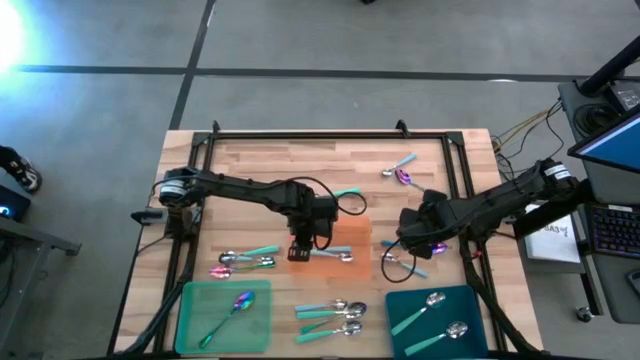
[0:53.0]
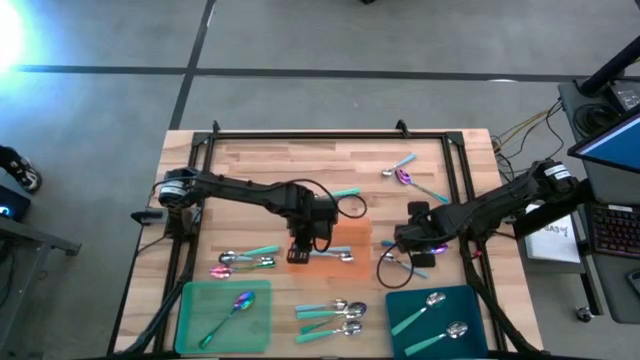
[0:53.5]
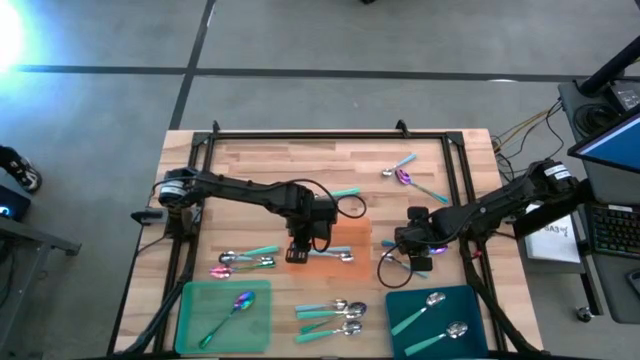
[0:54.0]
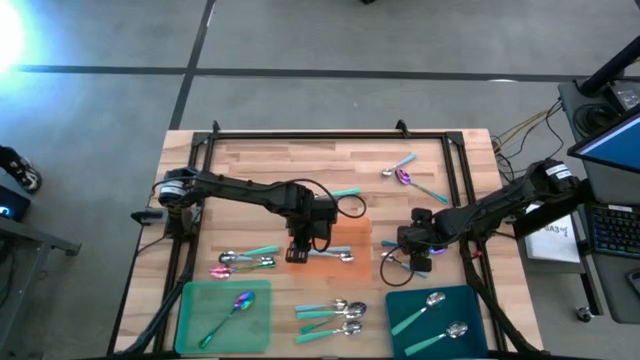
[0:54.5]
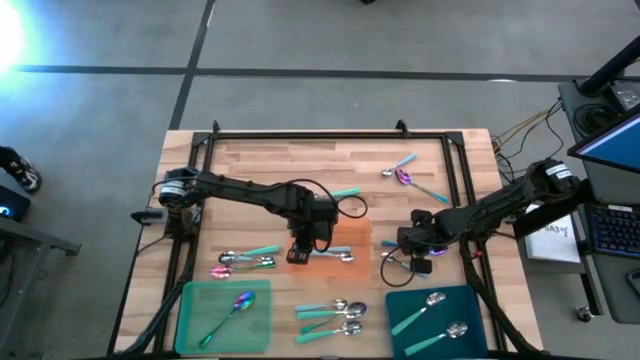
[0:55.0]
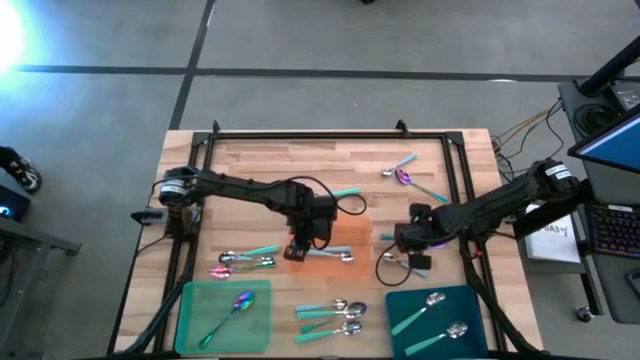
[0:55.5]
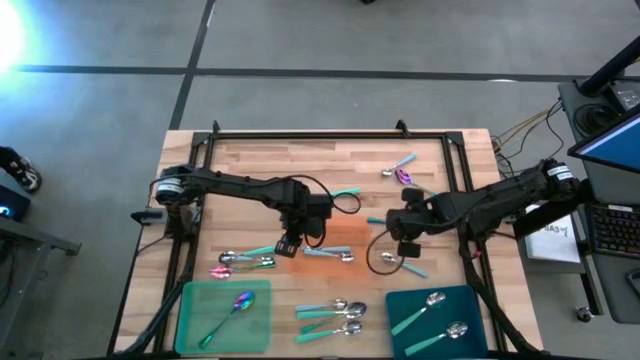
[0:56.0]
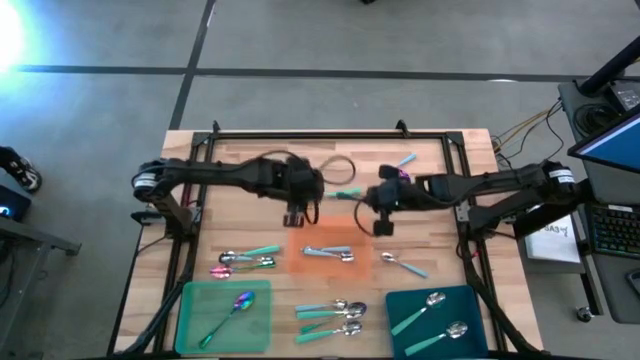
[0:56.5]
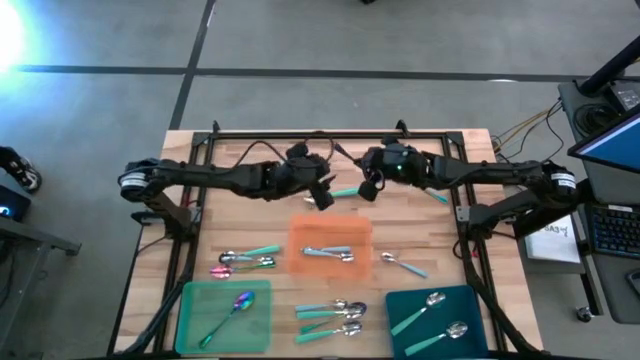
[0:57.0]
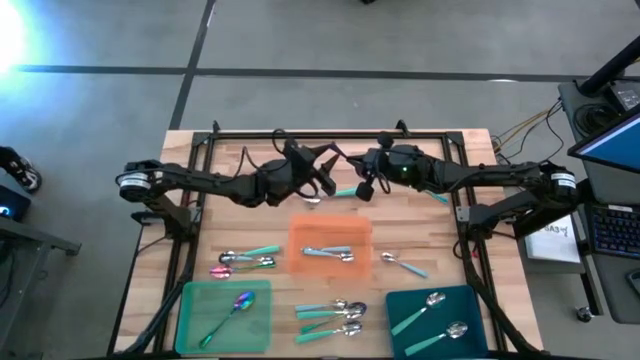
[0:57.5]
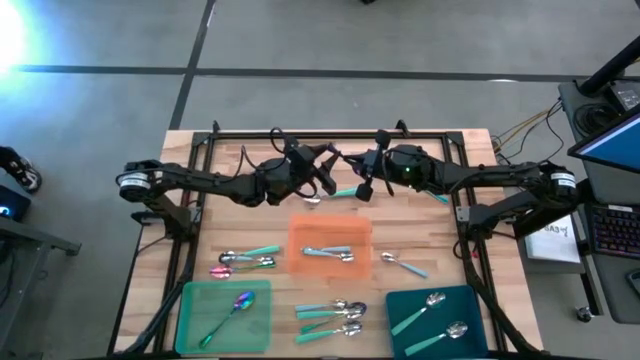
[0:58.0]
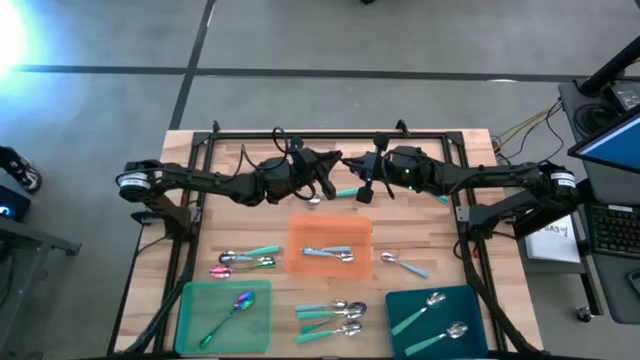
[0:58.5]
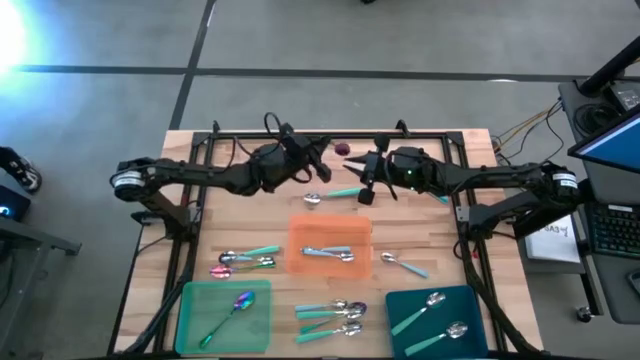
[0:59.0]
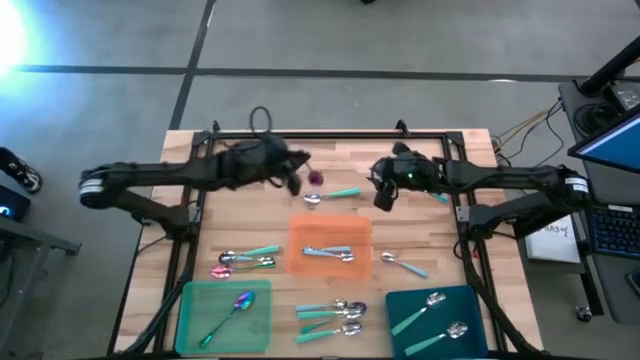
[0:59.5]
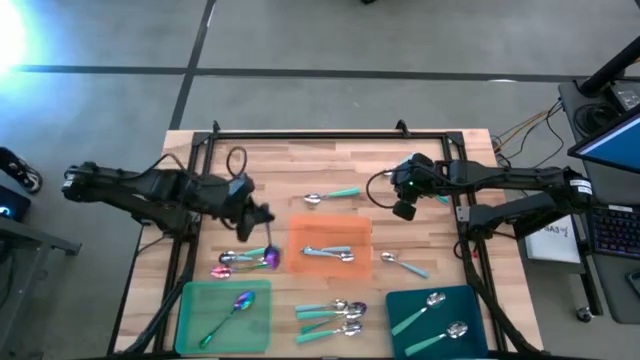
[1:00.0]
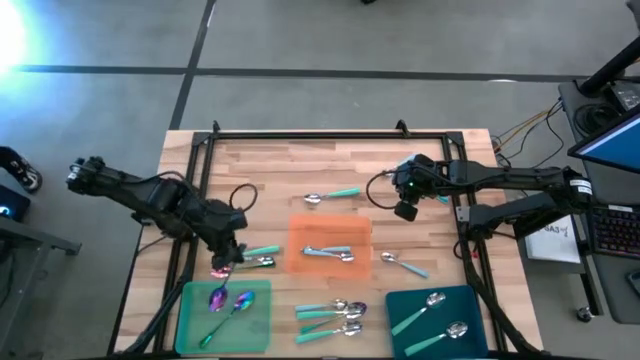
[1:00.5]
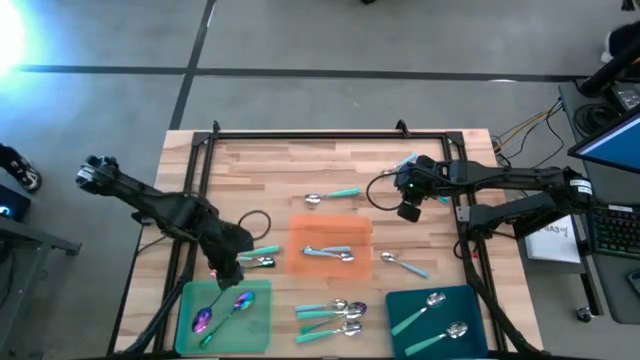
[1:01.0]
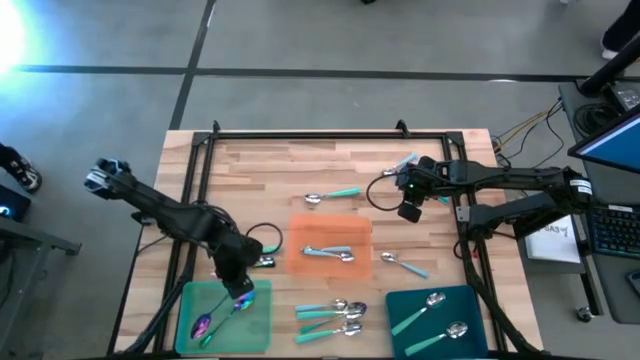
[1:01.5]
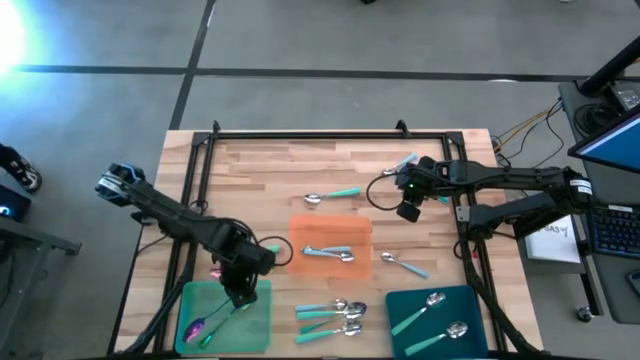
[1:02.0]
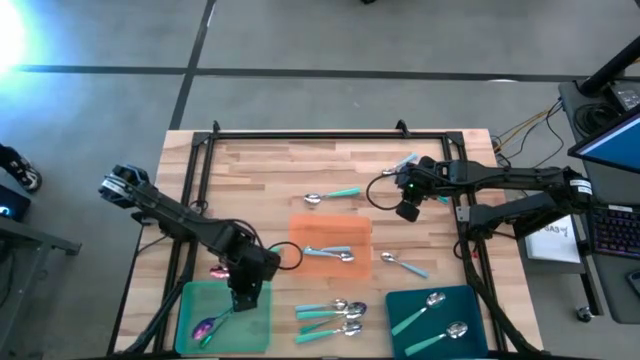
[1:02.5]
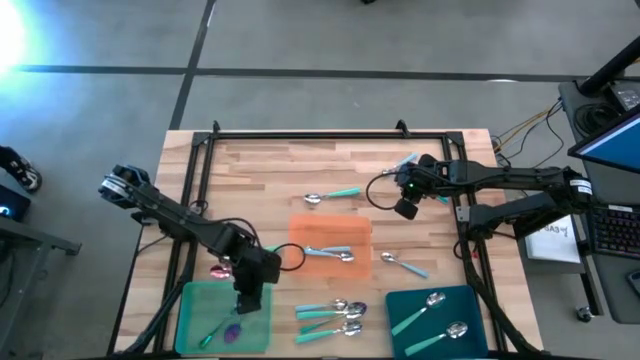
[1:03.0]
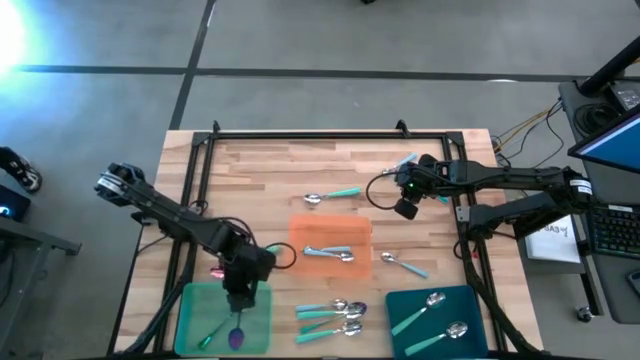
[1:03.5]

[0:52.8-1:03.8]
Task: Sort silverware by color (type)
Put the violet spoon into the green bin

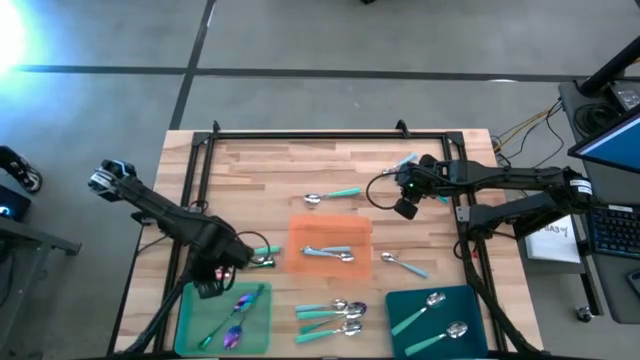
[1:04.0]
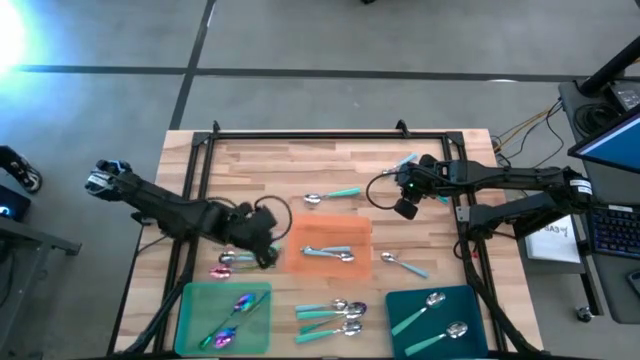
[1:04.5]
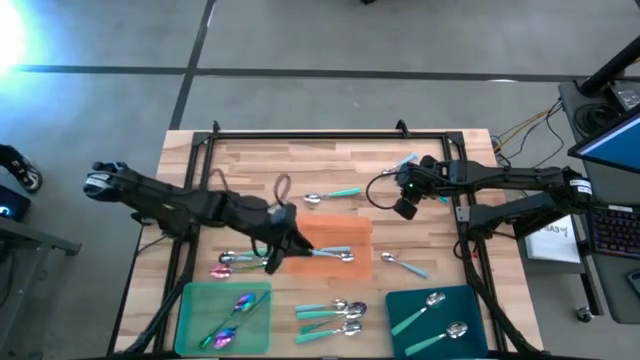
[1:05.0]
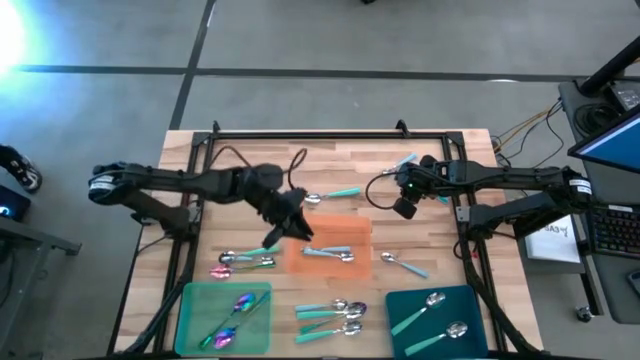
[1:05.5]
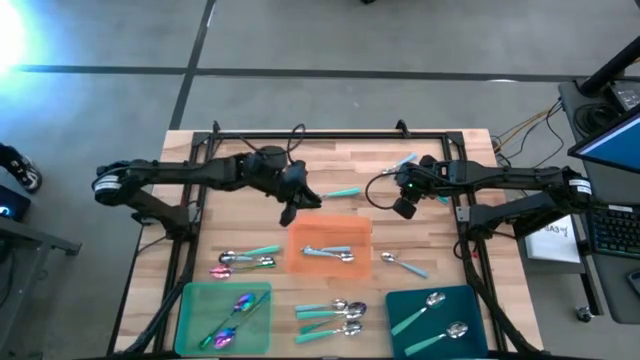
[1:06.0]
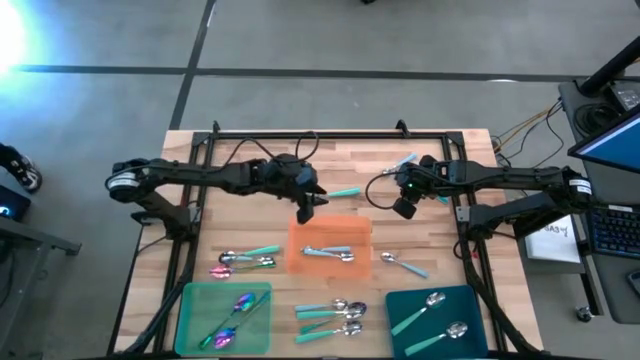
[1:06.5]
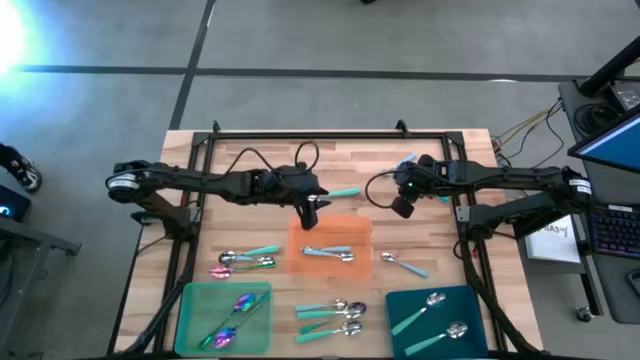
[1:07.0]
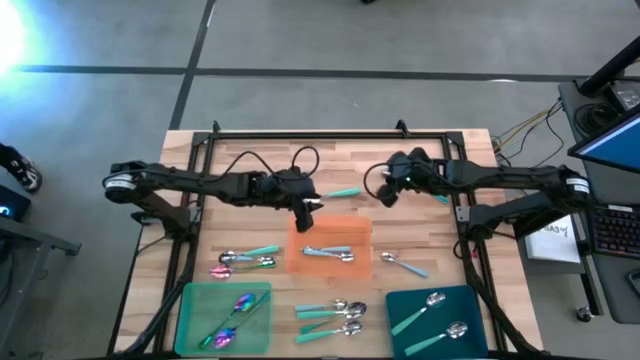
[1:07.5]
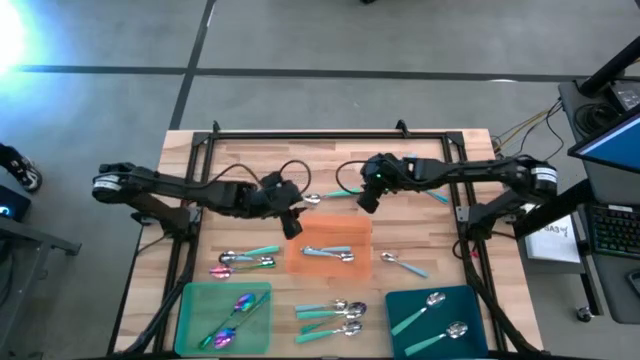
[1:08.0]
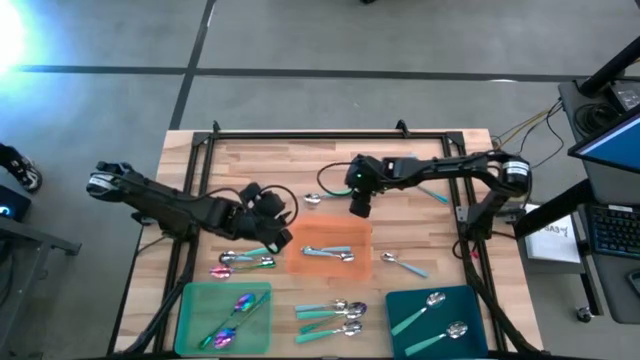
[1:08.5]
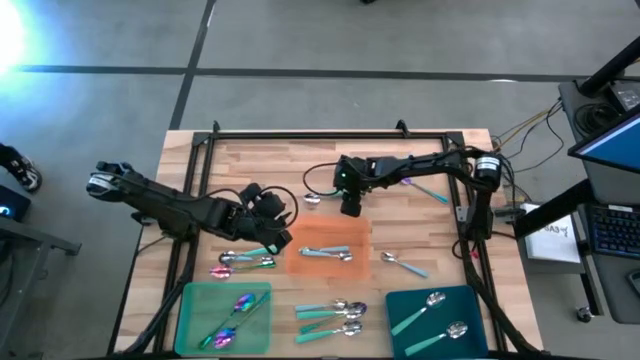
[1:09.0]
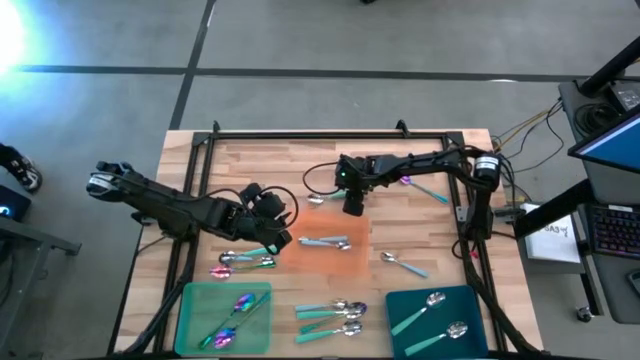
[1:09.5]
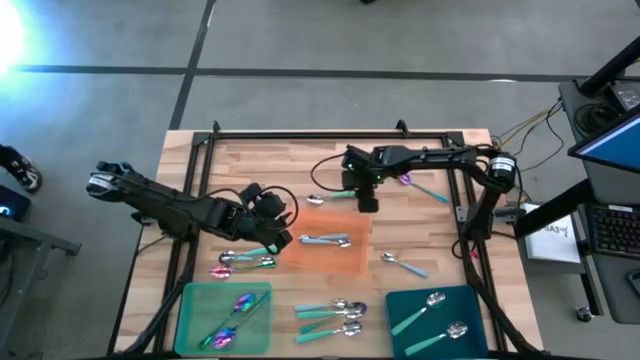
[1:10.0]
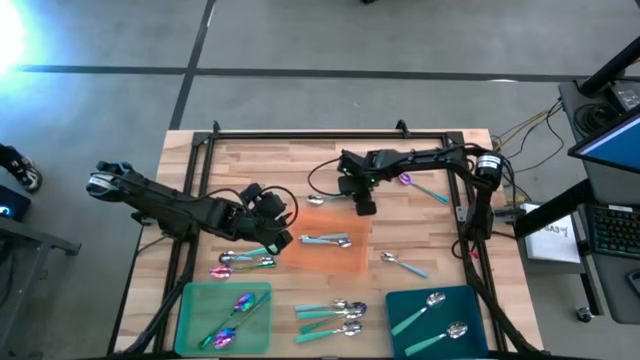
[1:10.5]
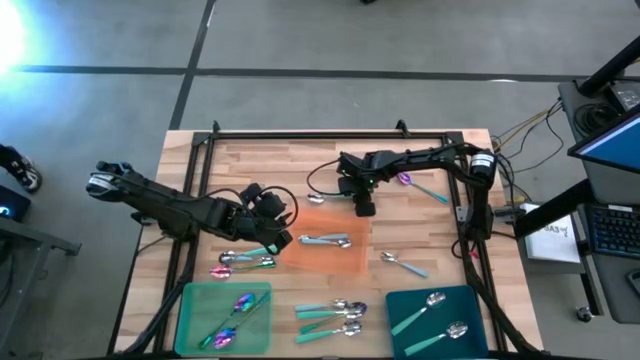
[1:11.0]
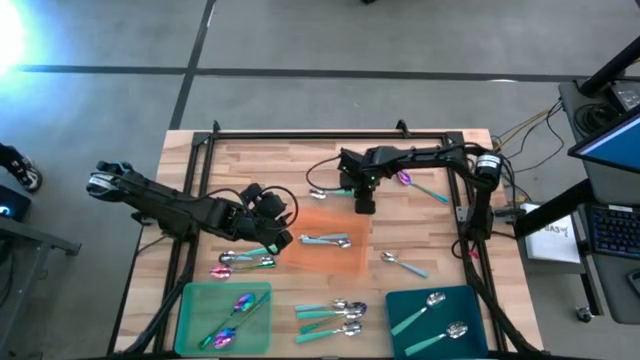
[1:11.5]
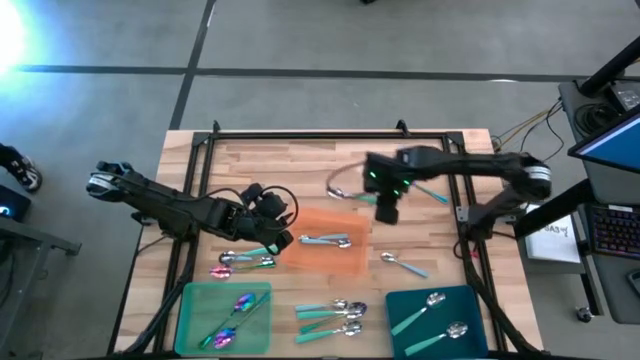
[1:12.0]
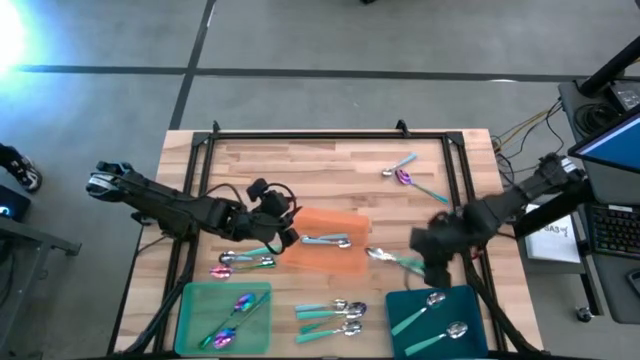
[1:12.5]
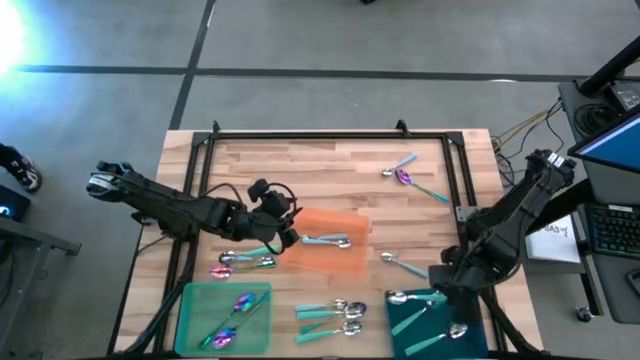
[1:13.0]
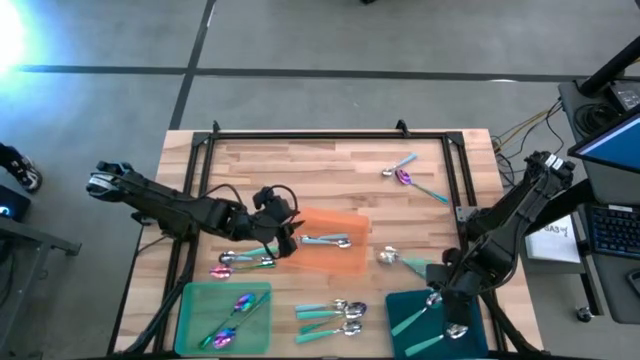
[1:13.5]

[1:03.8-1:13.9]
Put the green spoon into the blue bin

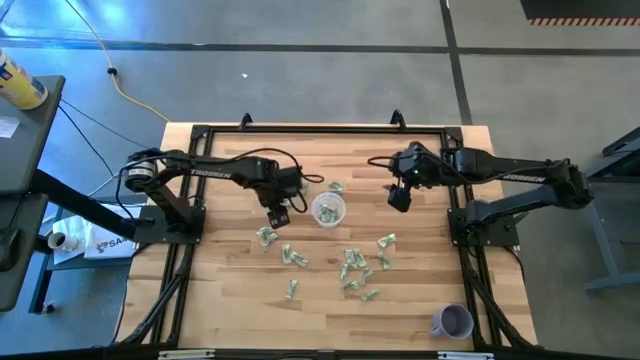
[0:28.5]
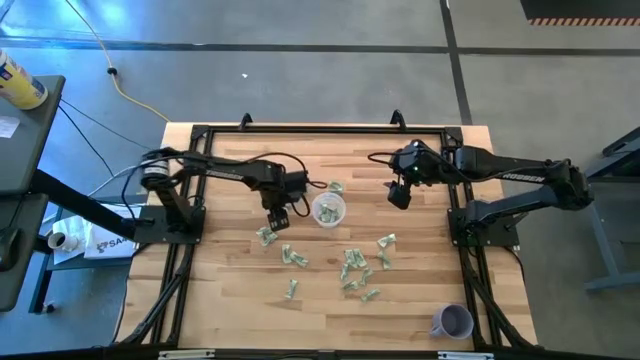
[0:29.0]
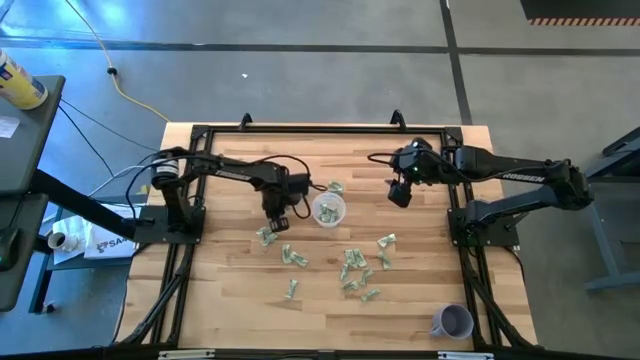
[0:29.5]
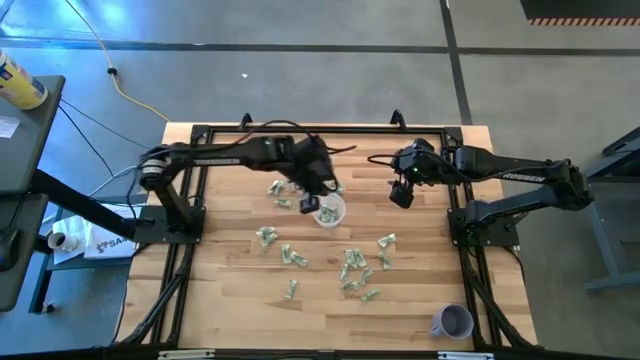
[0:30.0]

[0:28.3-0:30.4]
Task: Pick and place Stevia / Truvia into bins
Put the white stevia packet into the transparent container
